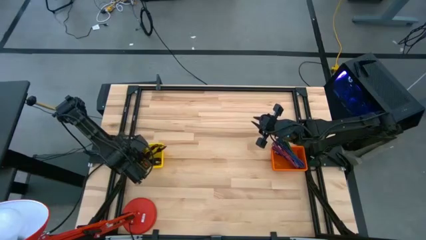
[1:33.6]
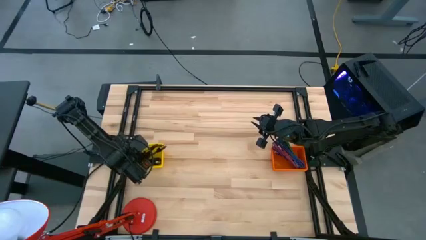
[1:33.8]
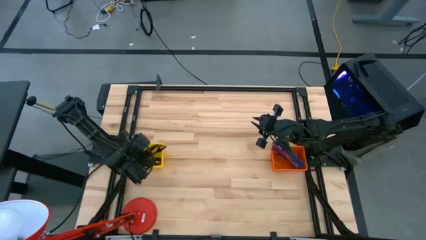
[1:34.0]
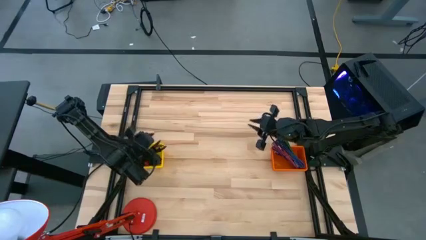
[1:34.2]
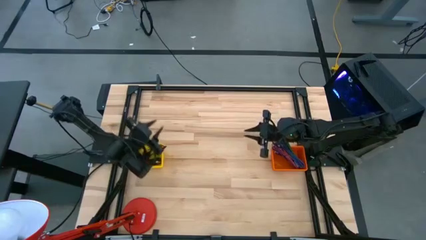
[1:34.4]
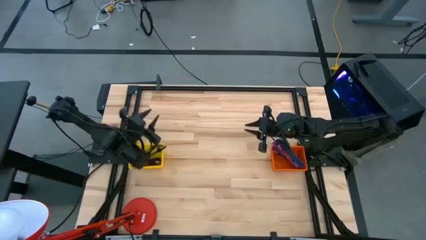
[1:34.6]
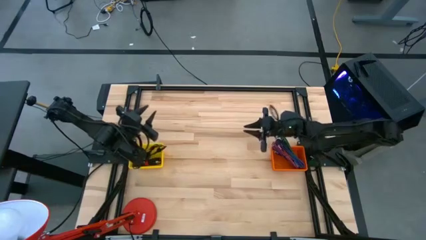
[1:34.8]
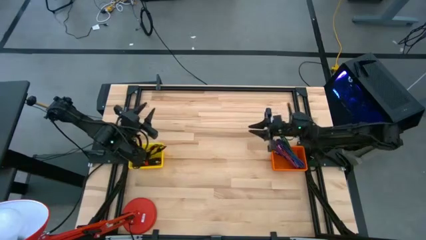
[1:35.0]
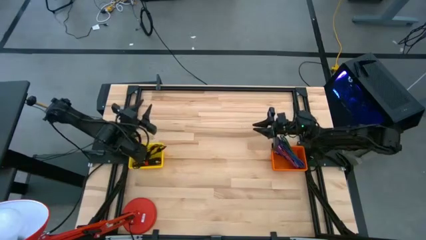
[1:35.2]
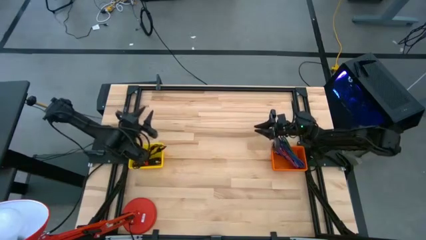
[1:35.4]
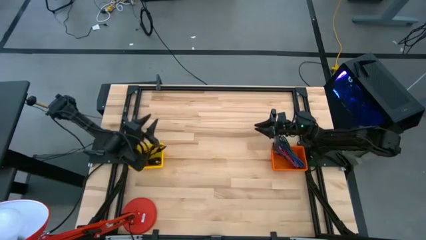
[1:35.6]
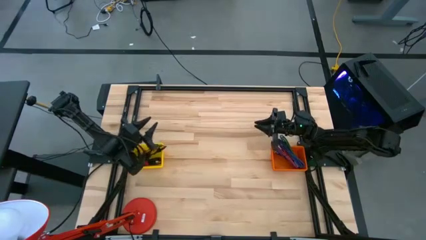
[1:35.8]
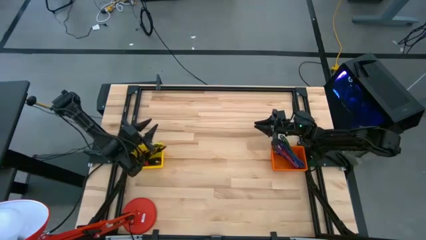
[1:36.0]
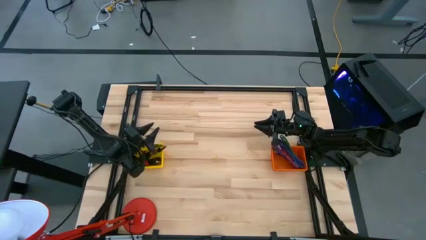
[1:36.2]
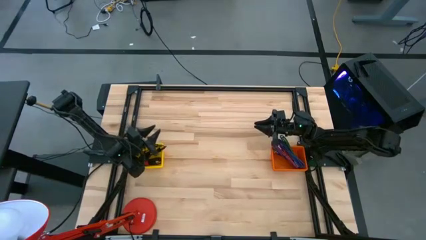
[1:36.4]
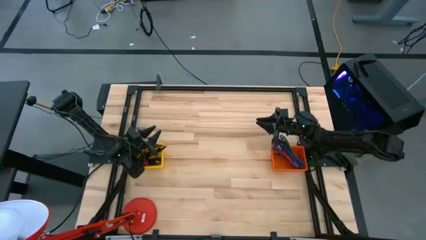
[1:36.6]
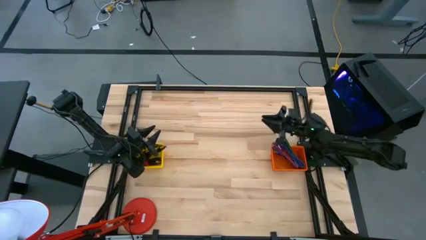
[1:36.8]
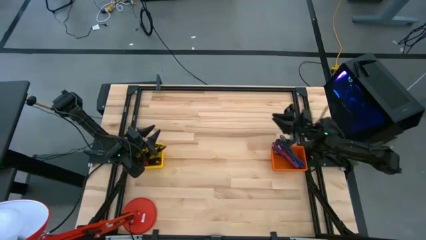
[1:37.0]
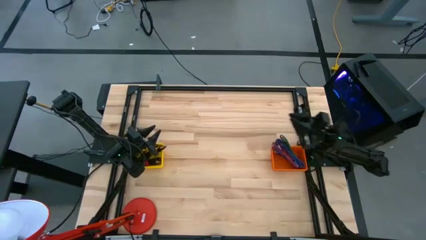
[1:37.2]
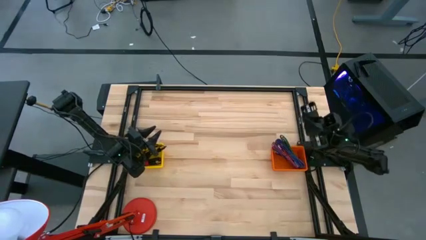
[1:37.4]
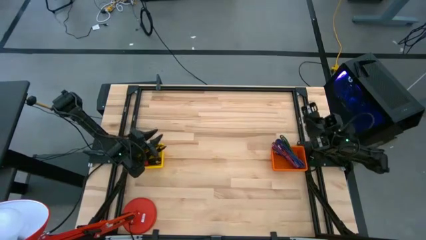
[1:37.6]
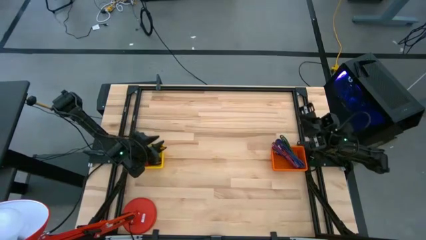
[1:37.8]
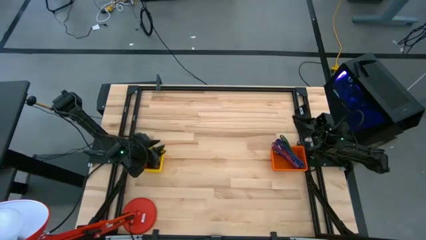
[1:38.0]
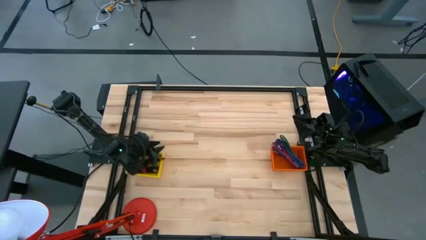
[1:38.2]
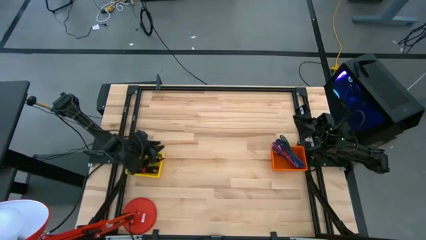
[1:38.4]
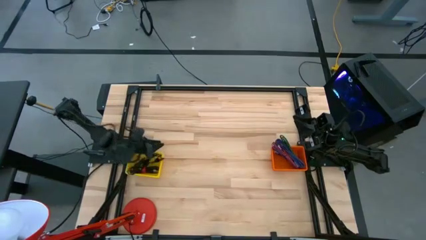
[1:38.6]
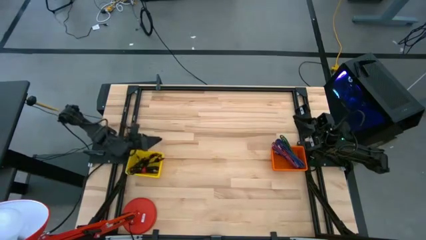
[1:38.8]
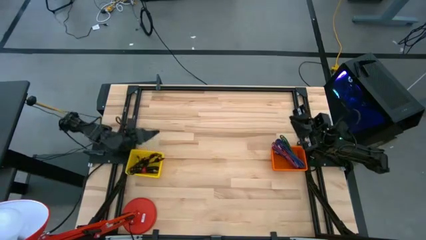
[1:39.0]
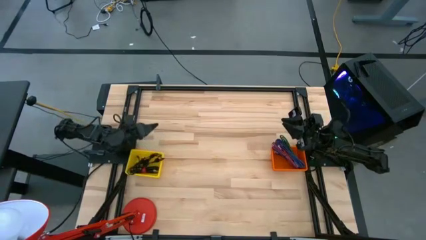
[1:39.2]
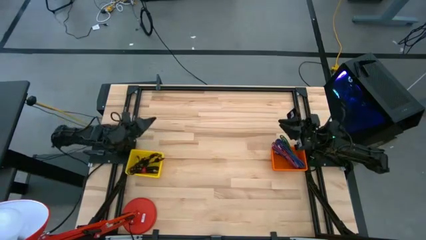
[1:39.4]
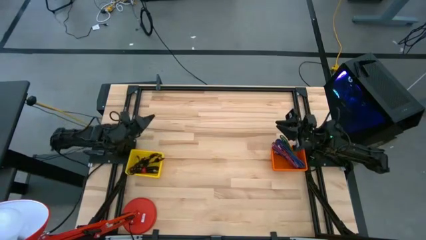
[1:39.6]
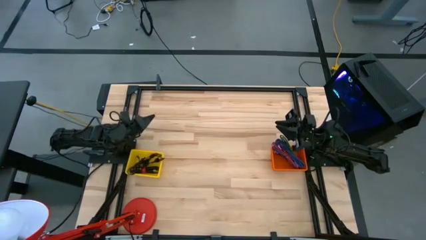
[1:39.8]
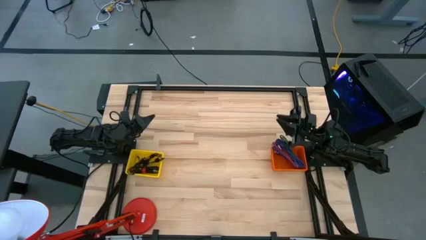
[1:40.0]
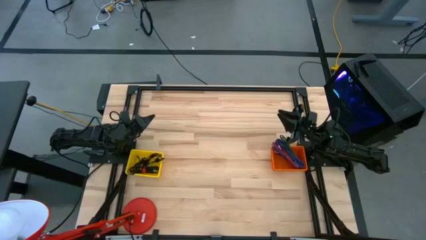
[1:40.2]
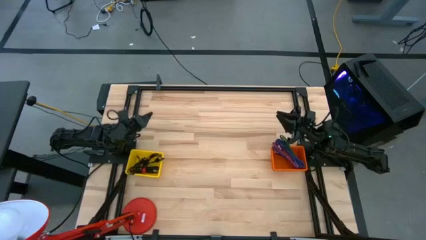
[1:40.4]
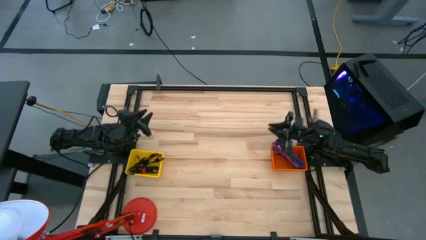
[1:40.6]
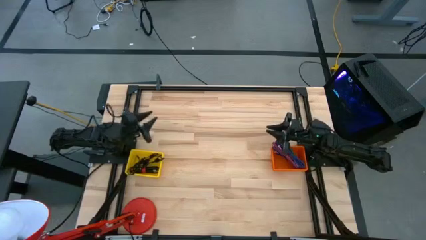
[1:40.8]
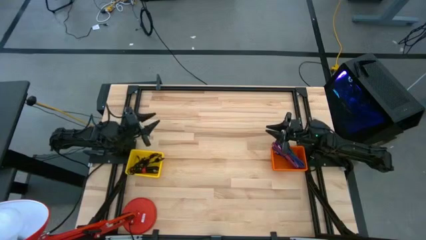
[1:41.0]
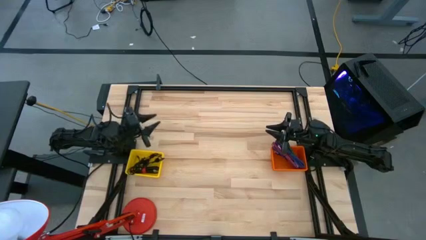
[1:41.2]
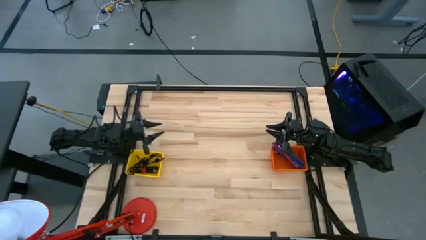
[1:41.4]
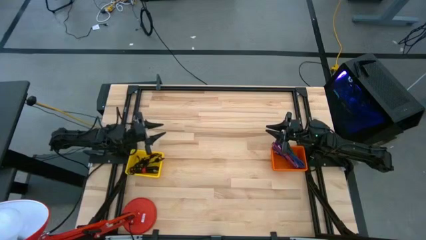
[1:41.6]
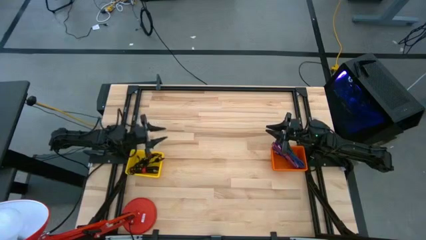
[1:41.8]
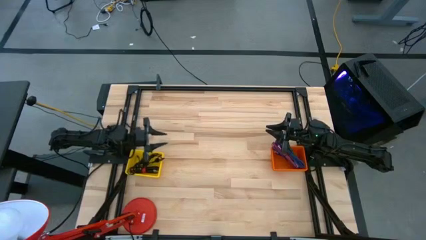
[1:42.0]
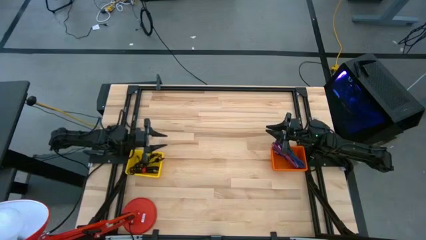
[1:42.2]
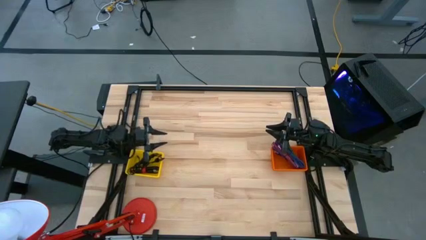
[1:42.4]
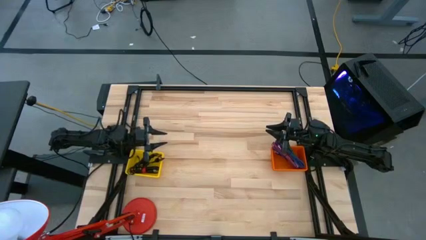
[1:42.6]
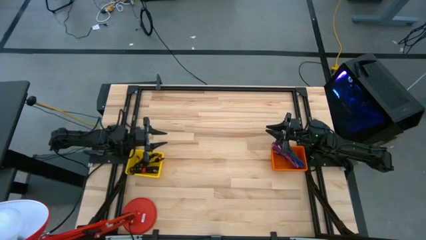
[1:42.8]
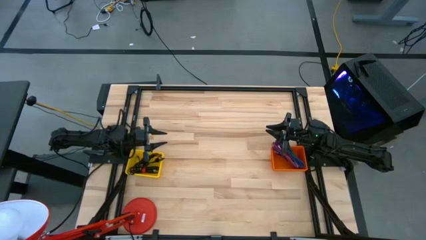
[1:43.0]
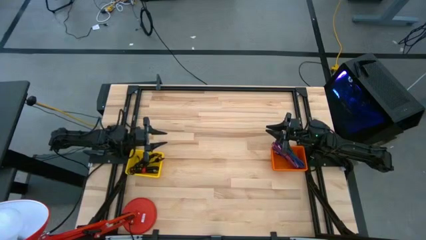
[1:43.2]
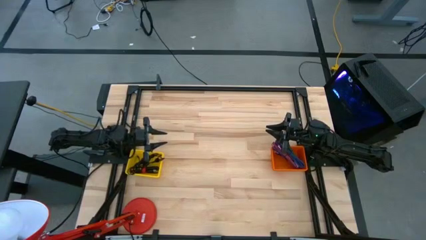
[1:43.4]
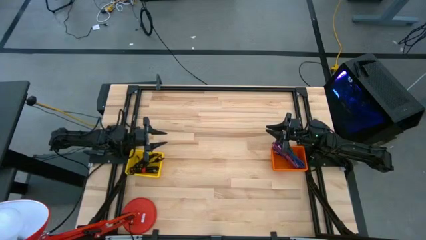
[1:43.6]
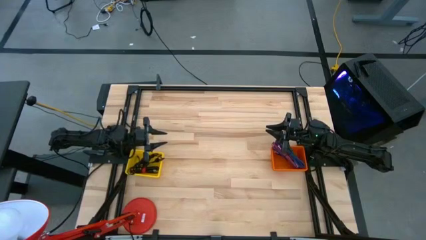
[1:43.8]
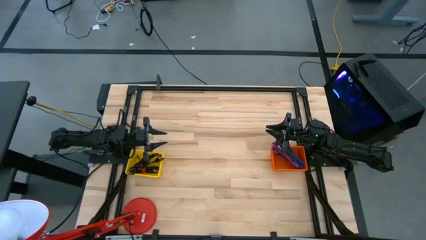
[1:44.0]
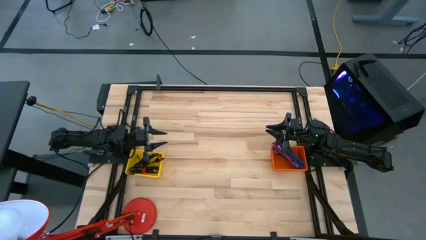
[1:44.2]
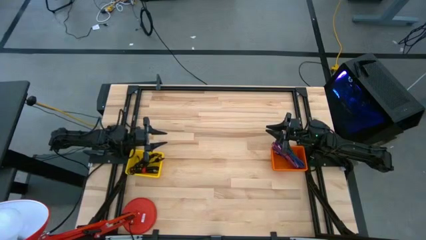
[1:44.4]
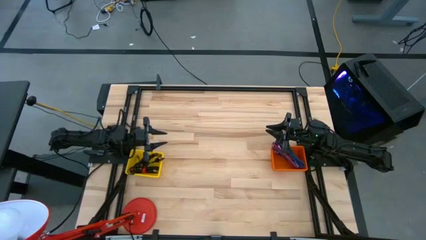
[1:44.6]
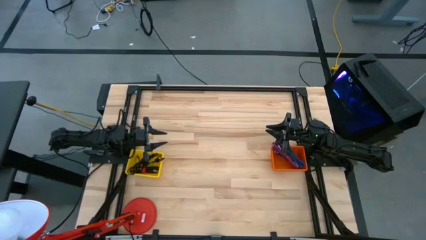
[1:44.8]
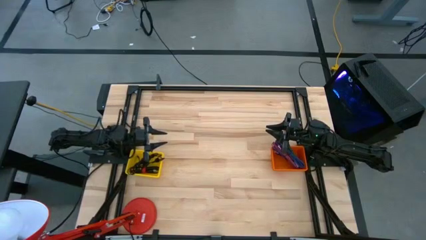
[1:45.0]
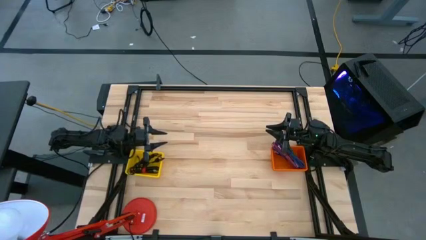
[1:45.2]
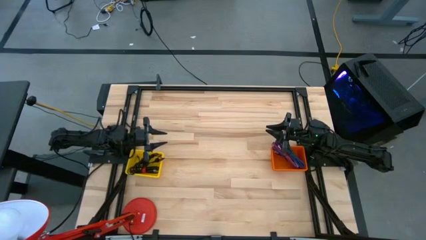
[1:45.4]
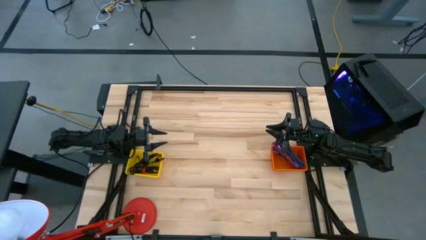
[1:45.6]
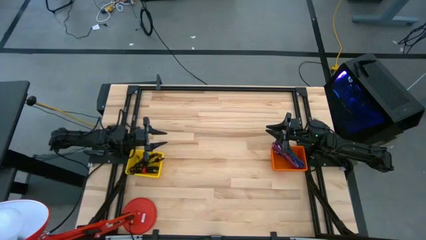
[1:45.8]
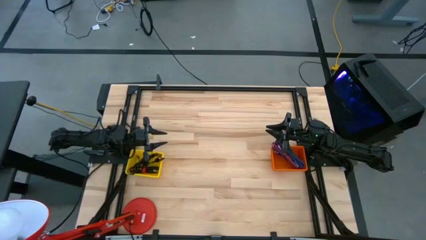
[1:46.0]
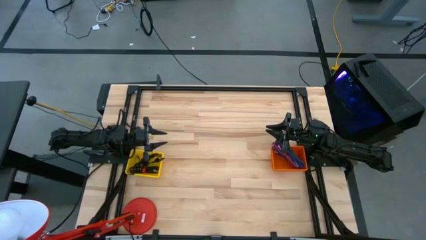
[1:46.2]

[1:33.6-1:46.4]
Task: Pick & Place USB Port
Return to Home Position

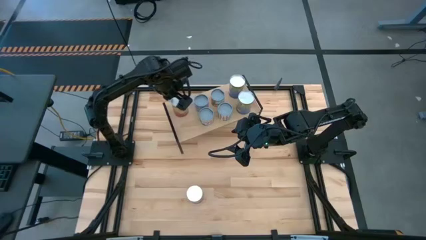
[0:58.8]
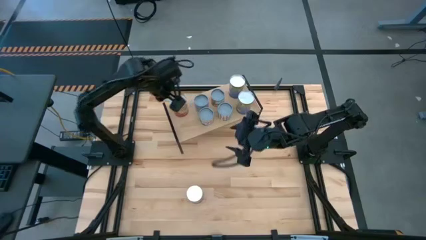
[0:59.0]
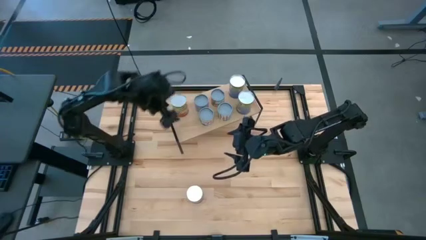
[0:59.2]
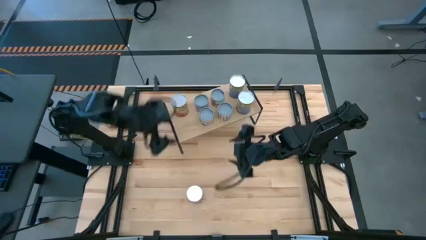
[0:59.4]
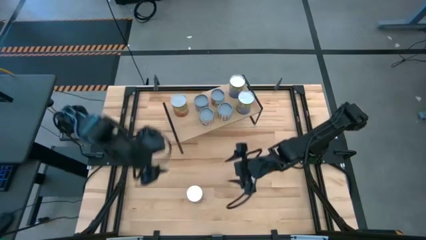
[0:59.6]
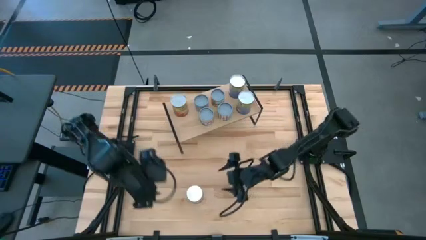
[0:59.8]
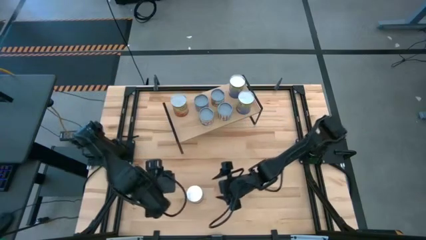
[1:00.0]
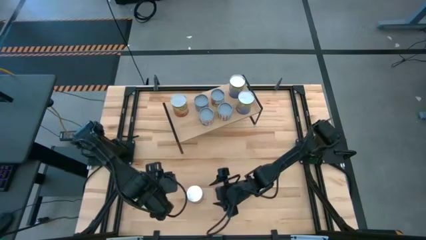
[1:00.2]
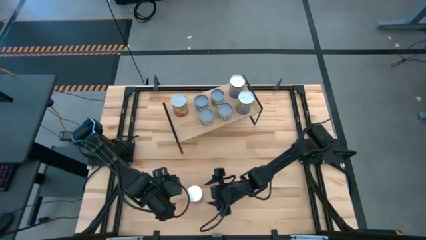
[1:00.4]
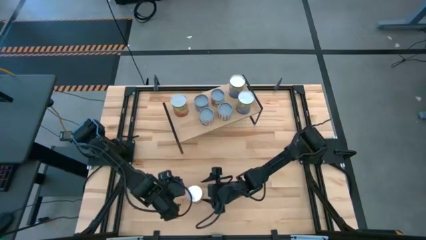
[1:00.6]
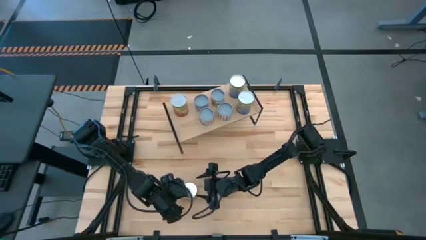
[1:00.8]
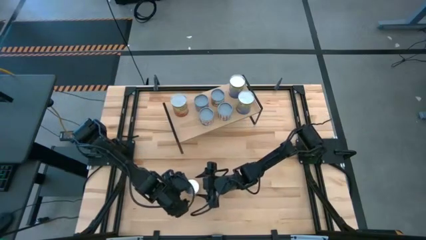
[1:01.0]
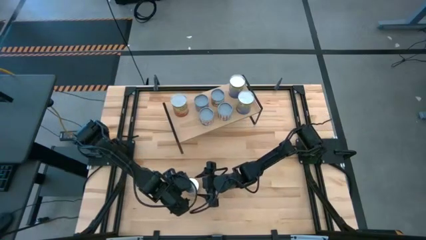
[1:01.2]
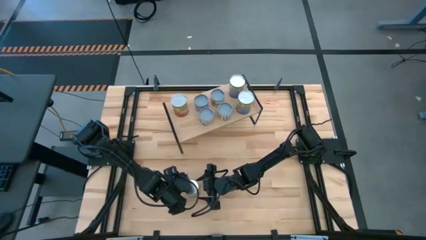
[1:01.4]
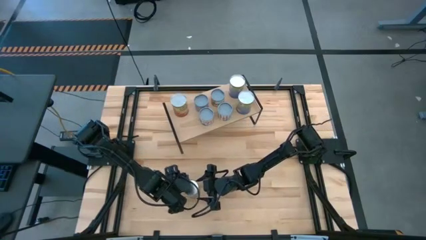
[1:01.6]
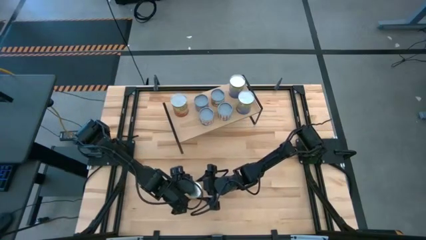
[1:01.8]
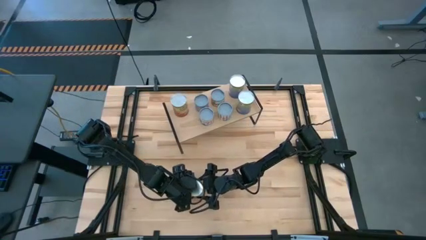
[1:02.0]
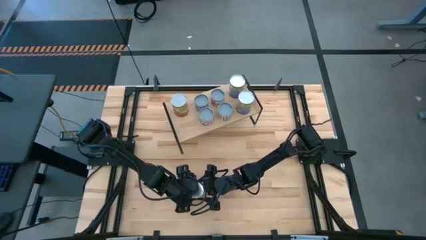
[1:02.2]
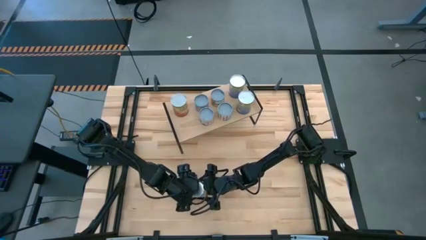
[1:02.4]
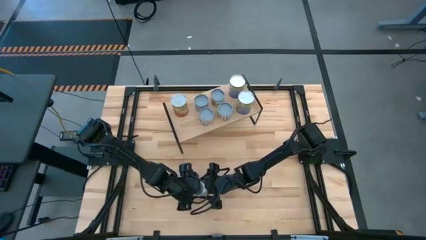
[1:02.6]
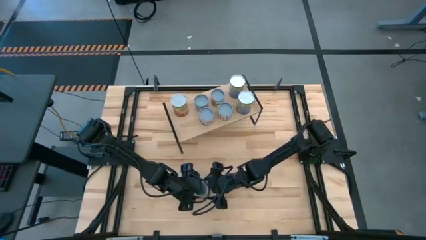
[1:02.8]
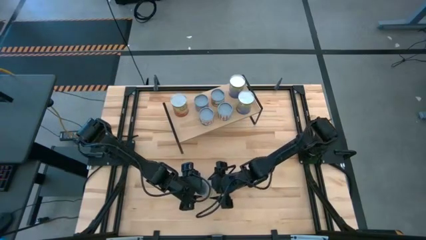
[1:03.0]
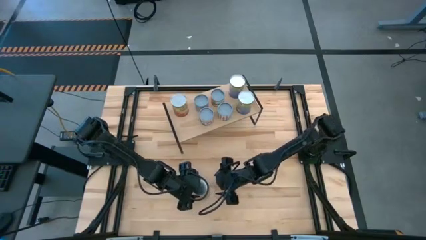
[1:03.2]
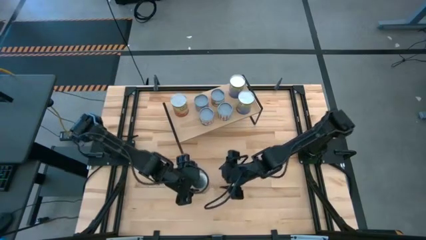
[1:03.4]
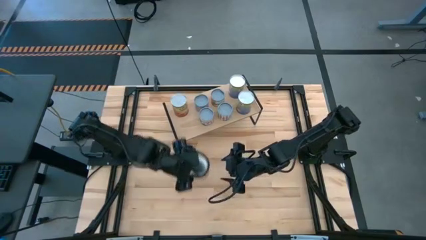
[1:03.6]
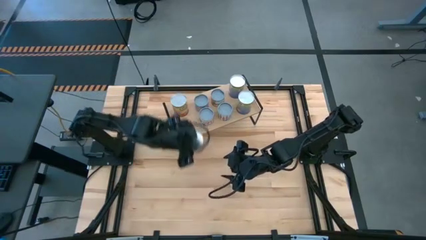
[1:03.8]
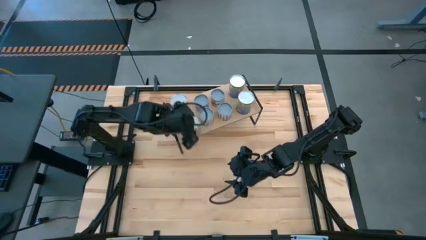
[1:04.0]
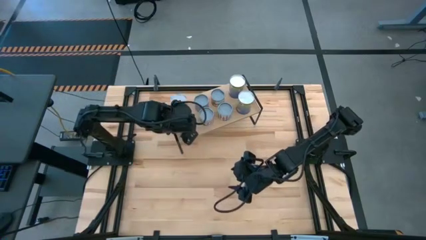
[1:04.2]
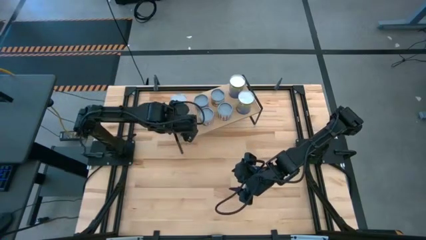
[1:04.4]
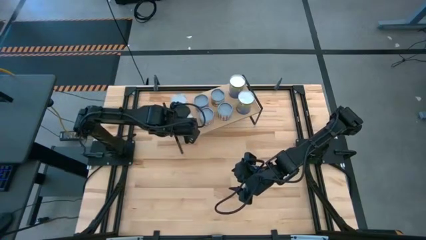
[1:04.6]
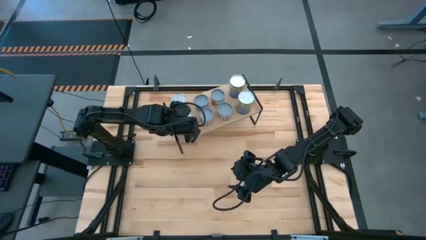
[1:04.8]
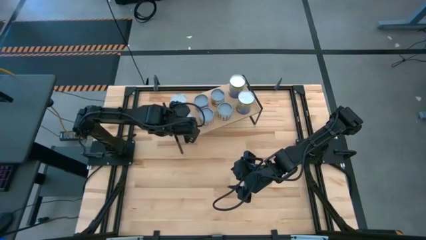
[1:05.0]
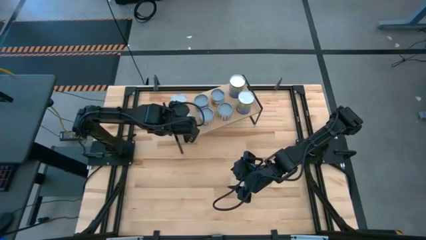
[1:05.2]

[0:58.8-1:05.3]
Task: Pick and place cans onto a shelf
Put the canned corn on the shelf aligned with the other canned corn
